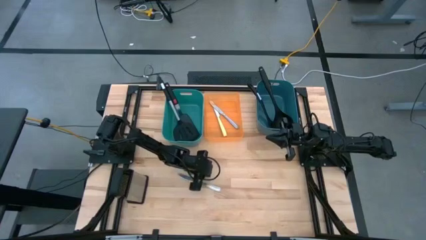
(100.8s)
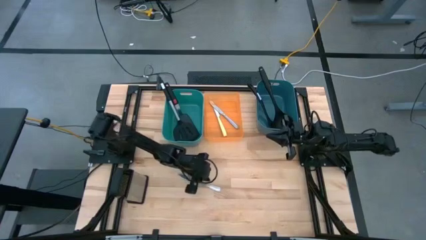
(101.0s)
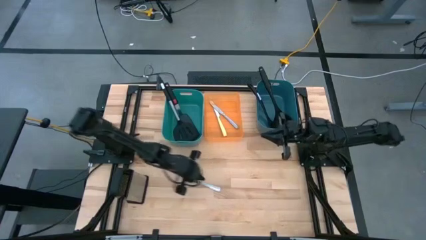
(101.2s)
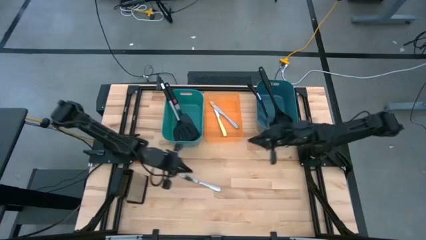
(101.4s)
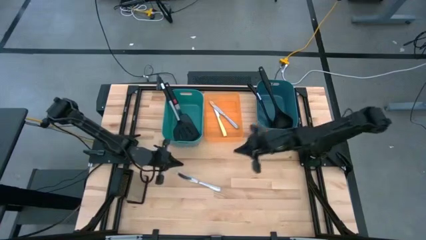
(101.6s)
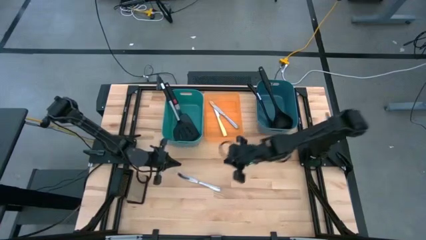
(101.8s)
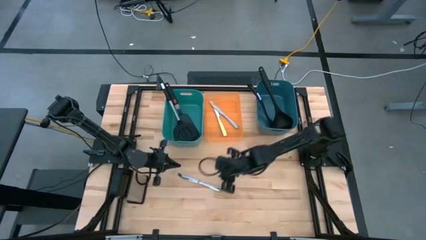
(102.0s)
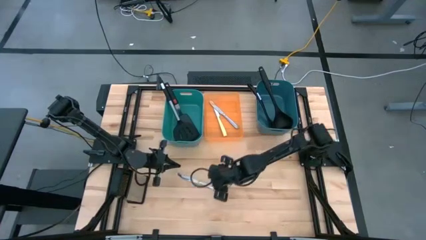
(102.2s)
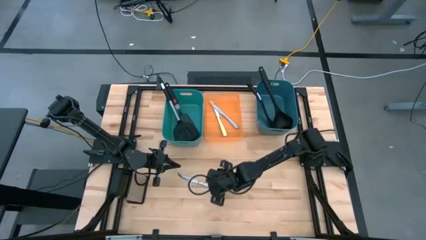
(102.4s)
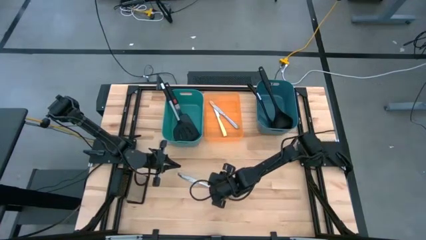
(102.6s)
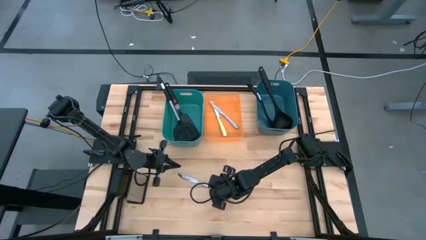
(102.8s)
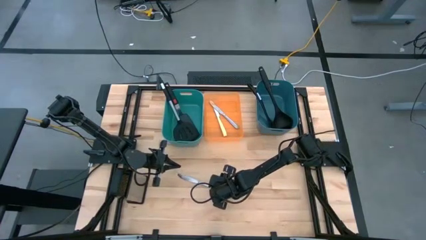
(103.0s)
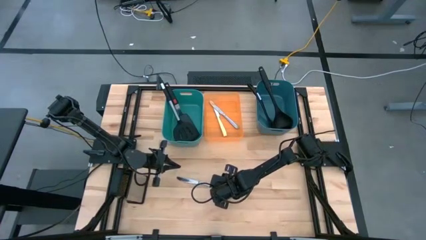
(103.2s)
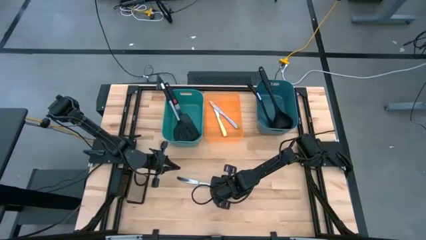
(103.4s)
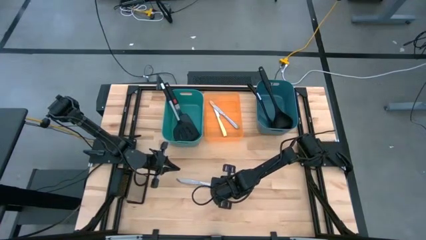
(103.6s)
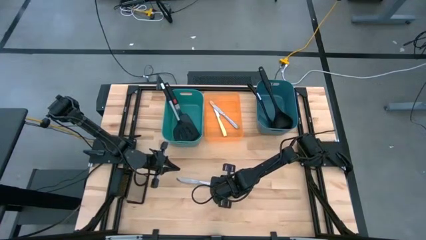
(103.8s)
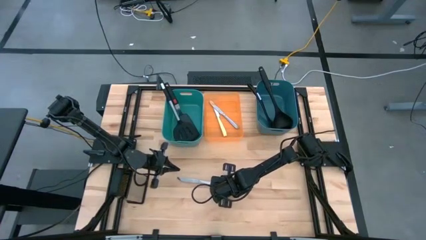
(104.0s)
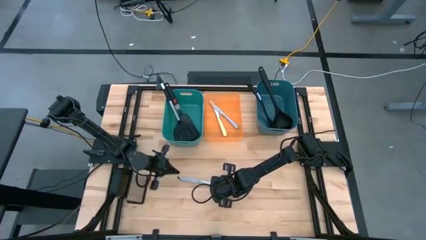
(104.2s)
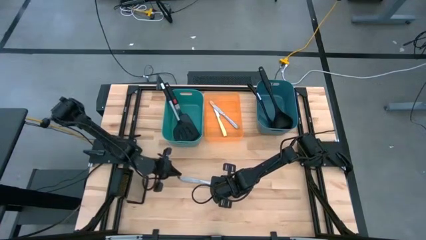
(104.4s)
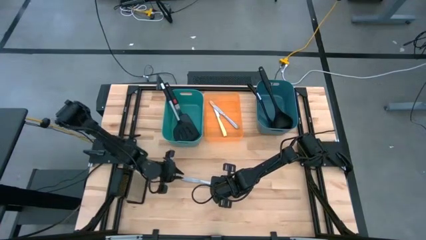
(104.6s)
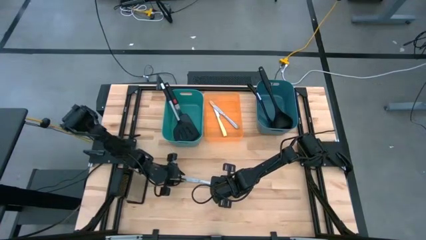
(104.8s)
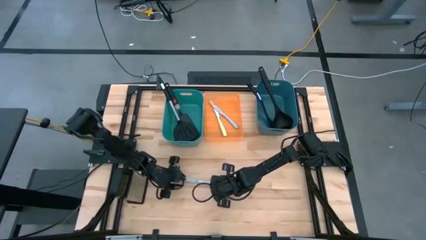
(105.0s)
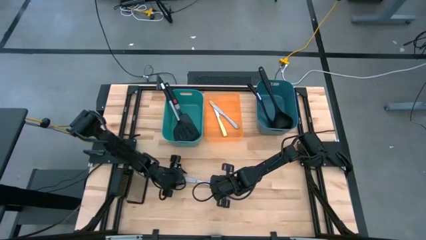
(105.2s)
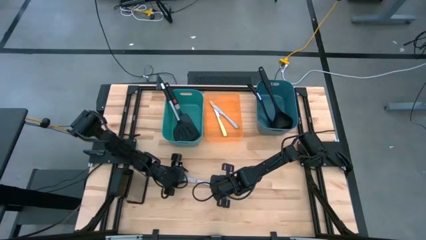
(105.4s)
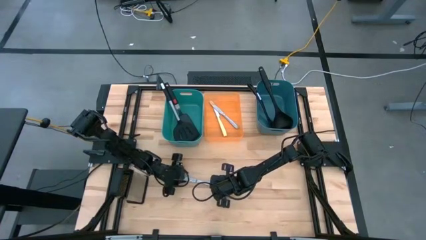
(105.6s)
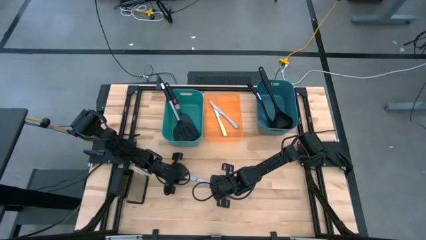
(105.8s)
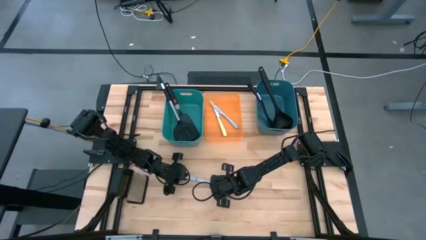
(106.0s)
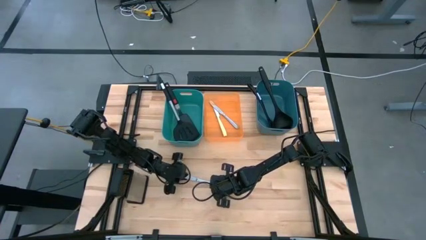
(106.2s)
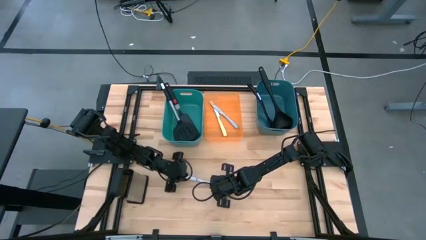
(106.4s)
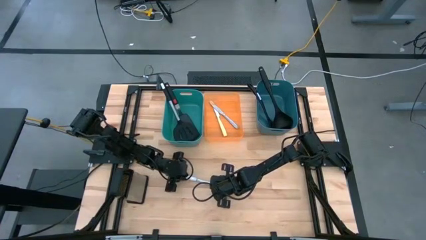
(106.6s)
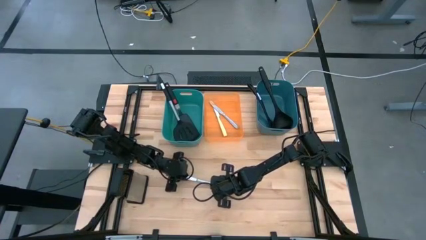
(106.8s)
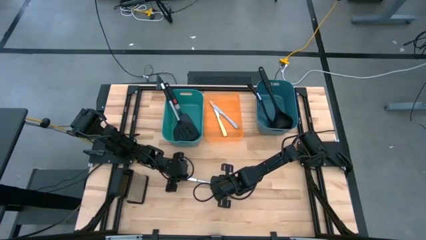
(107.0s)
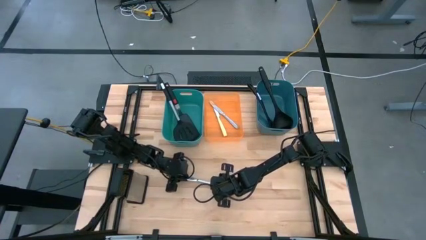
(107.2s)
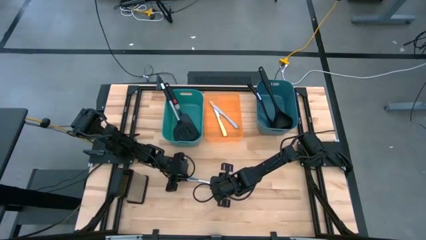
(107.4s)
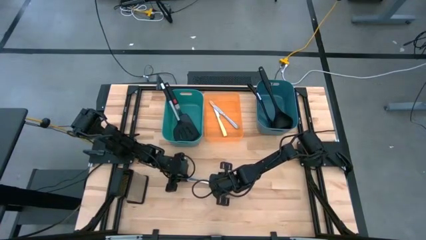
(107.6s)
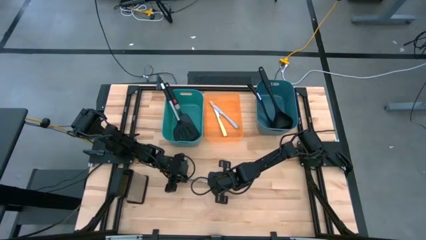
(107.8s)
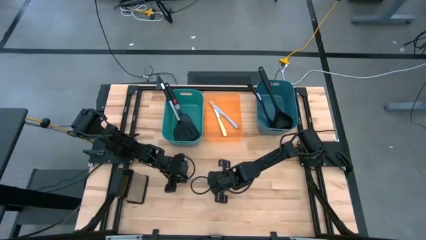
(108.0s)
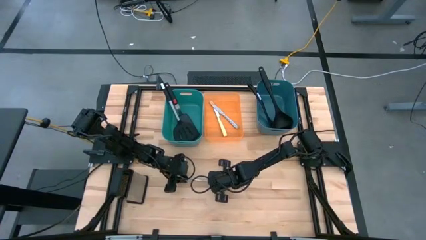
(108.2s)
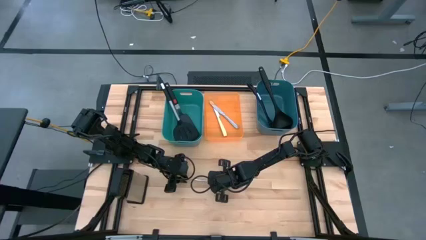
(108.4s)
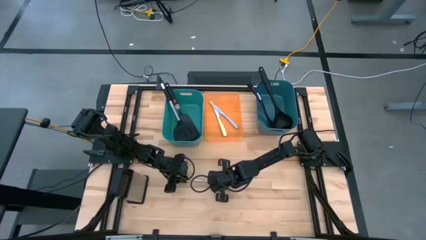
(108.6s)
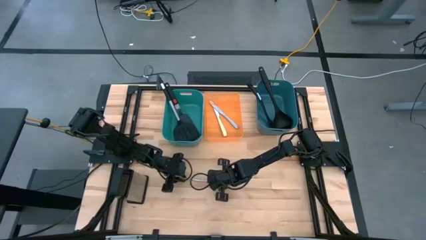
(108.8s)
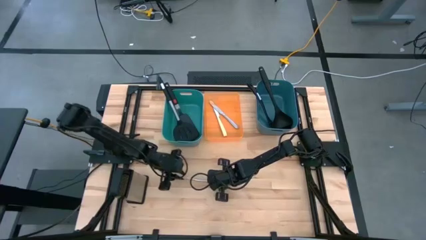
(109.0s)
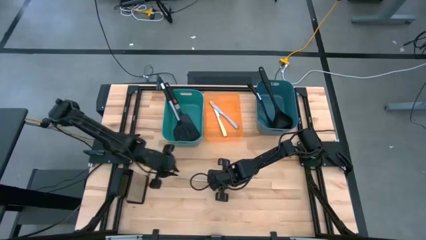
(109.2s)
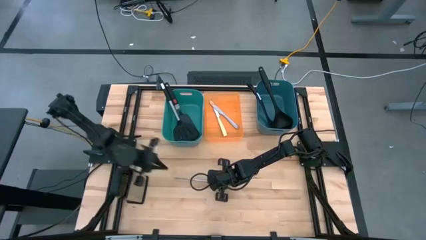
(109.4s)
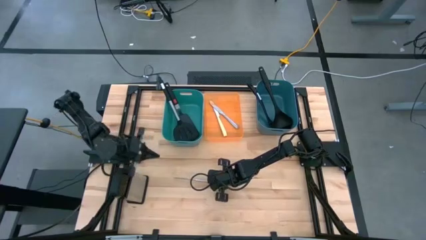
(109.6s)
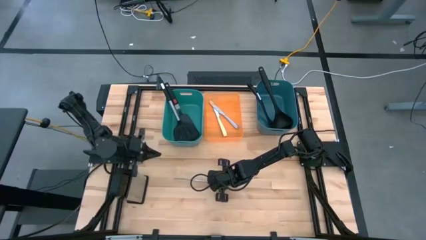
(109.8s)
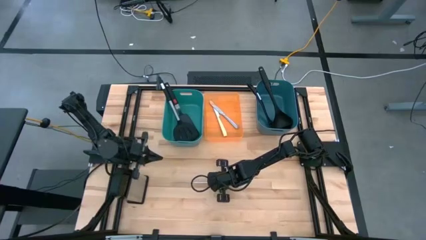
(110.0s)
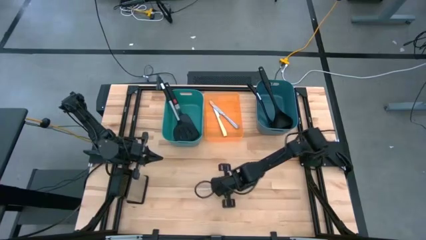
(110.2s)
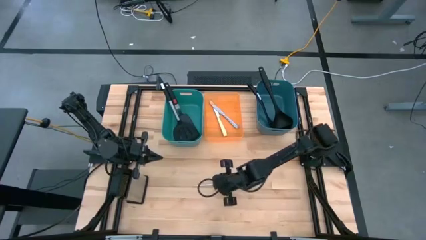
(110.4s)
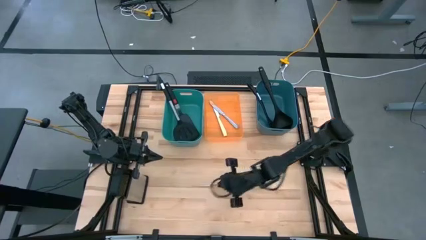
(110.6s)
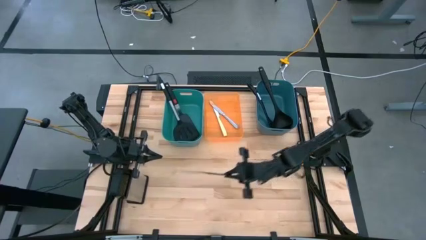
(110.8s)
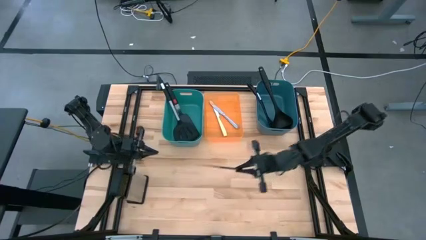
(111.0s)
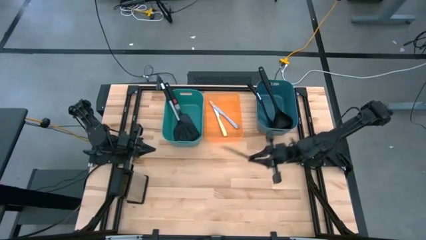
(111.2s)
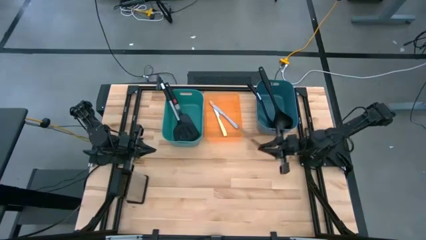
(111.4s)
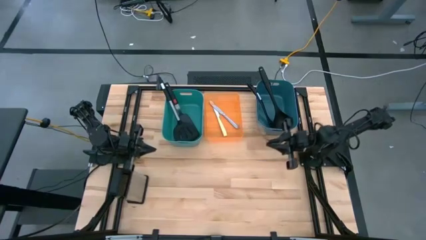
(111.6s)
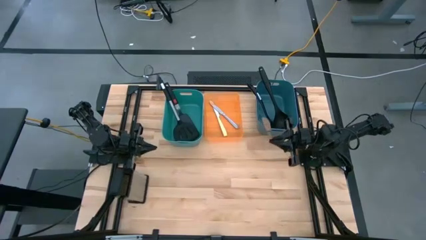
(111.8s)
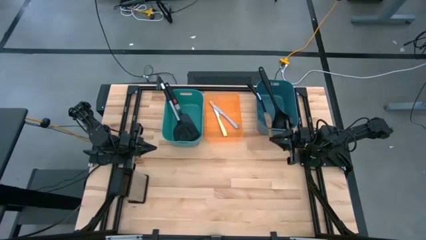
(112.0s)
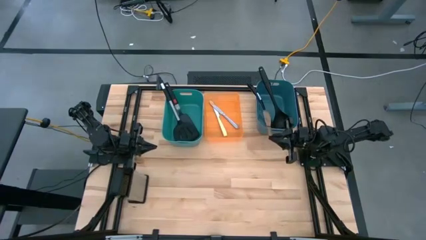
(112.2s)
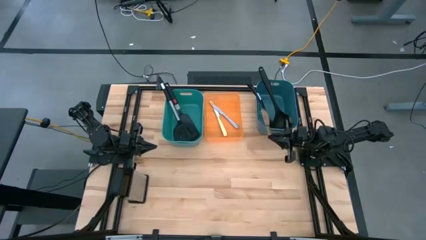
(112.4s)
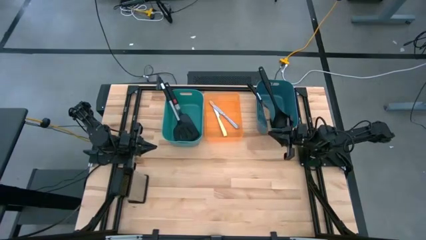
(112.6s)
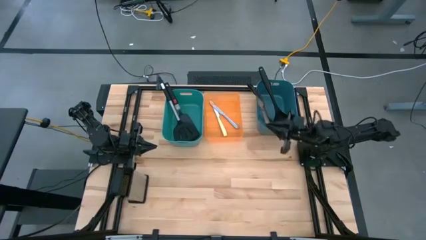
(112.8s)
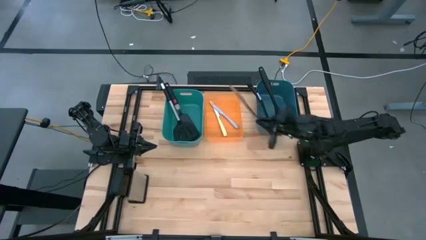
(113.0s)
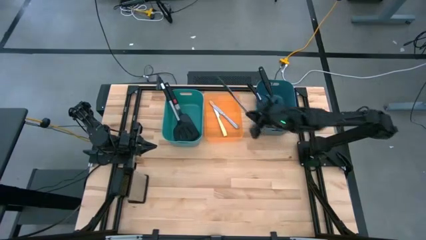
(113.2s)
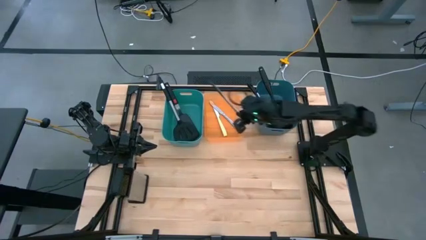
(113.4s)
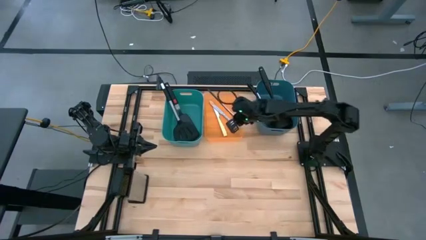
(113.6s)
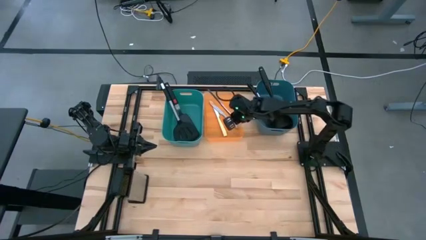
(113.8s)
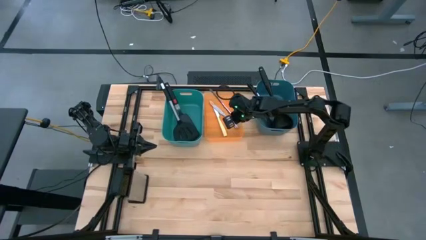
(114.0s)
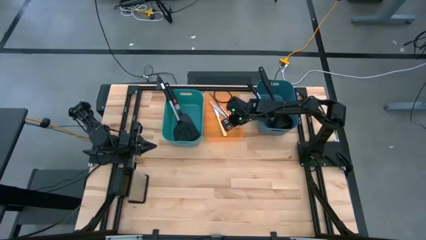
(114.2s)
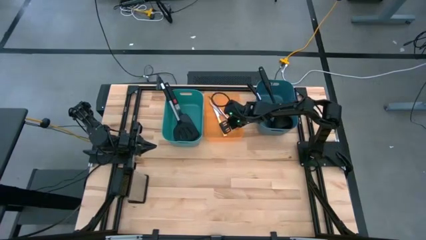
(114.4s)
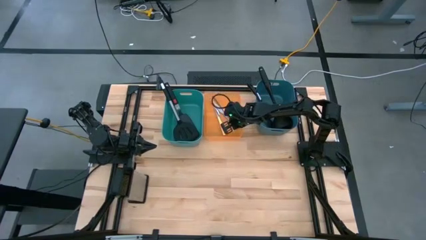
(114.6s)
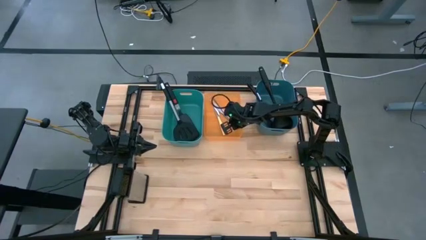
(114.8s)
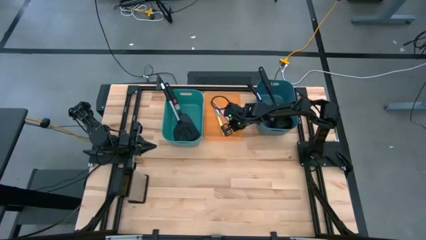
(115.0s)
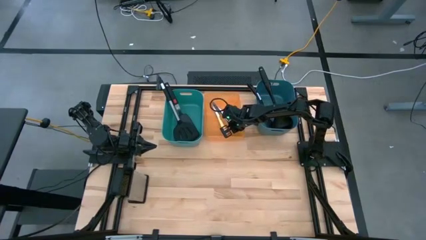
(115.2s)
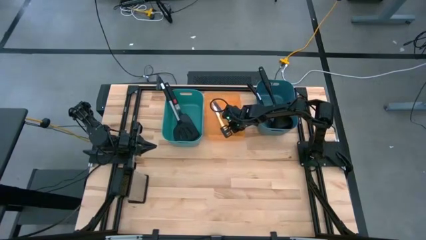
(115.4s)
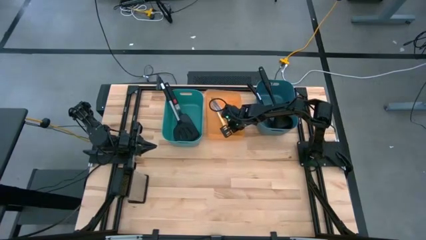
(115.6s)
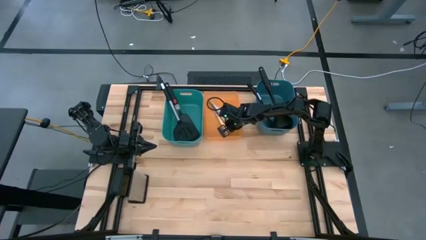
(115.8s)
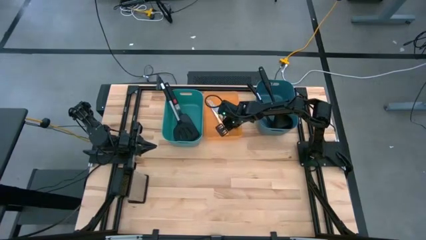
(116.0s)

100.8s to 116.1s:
Task: Pick & Place Kitchen Items
Put the silver knife into the orange bin

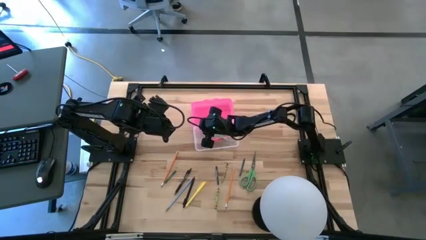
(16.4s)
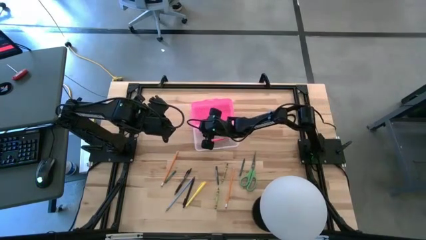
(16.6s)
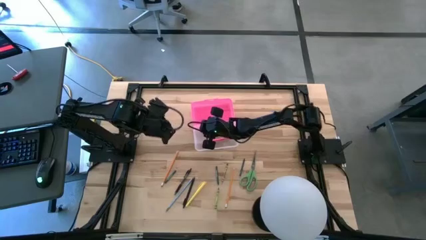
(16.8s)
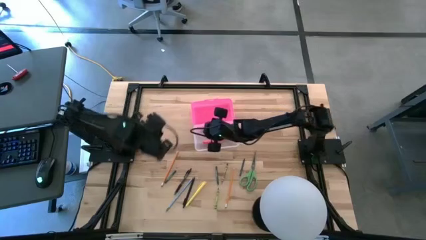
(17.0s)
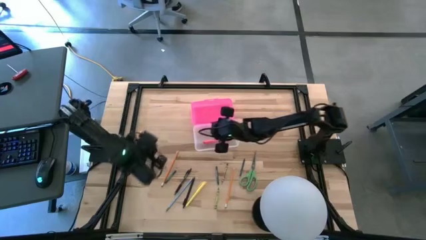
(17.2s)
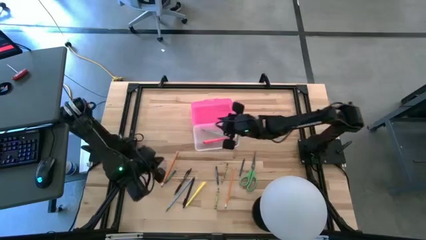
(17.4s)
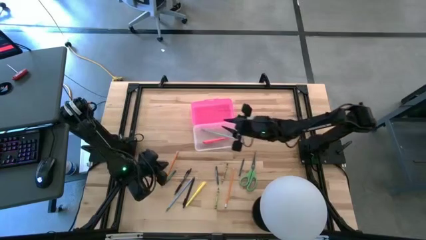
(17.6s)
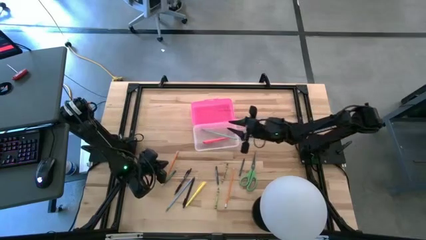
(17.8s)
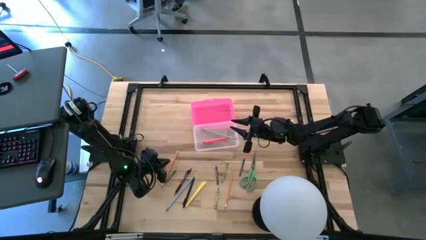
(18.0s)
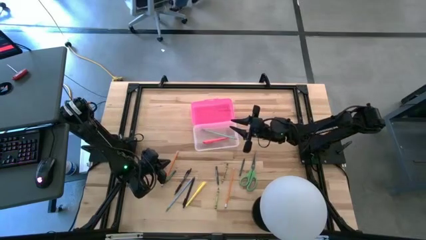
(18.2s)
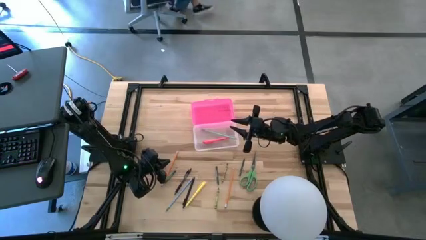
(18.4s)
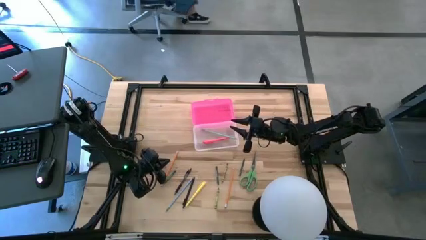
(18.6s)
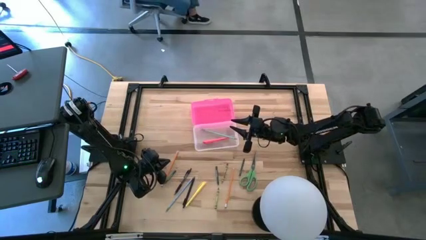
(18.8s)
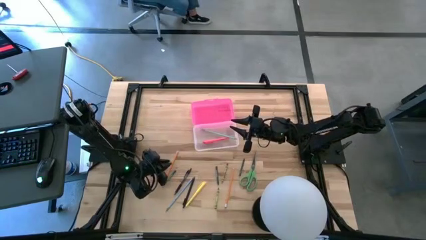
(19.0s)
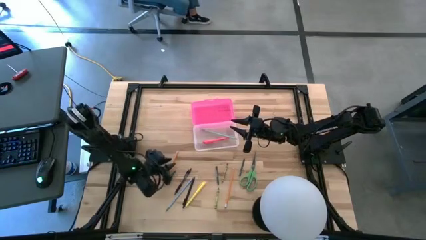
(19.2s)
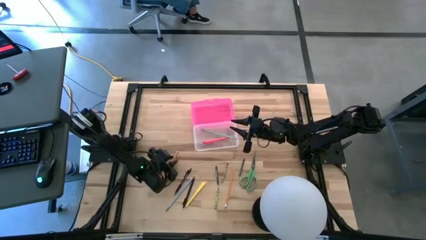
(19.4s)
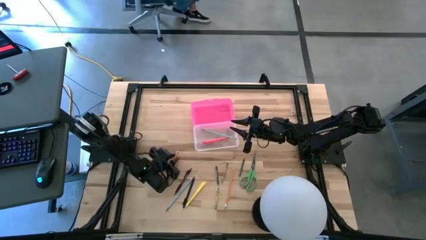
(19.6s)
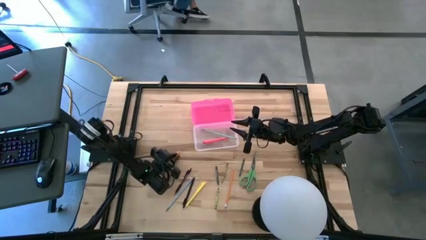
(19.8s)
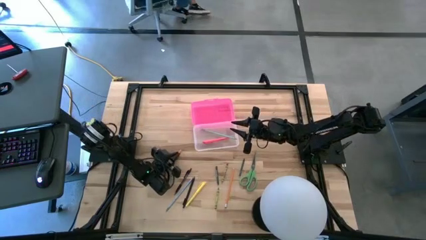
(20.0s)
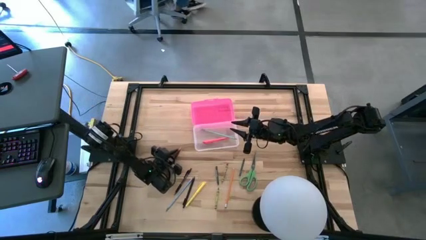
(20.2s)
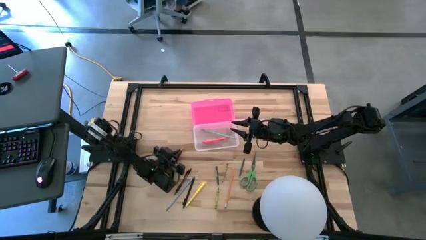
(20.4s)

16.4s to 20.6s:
Task: Pick & place school supplies into a supply box
Put the left orange pencil into the pink supply box
